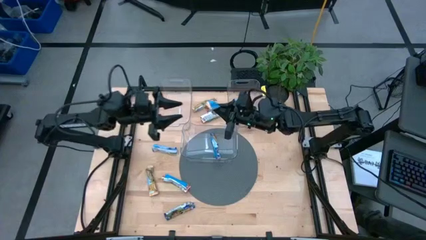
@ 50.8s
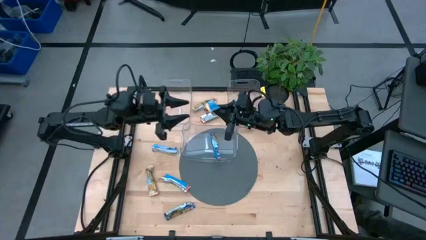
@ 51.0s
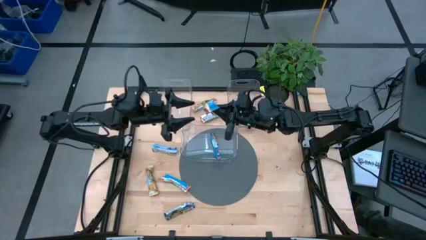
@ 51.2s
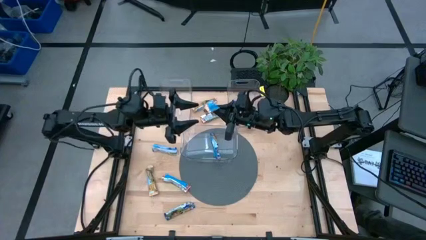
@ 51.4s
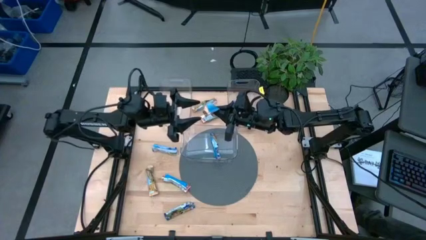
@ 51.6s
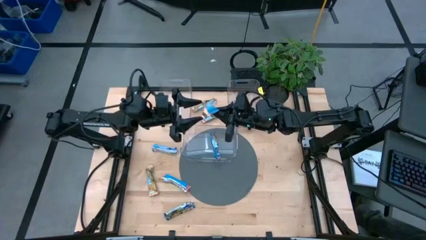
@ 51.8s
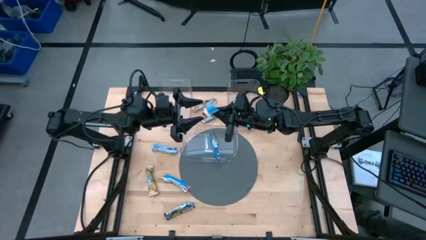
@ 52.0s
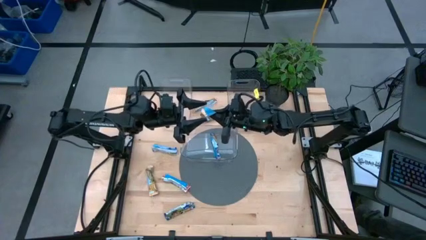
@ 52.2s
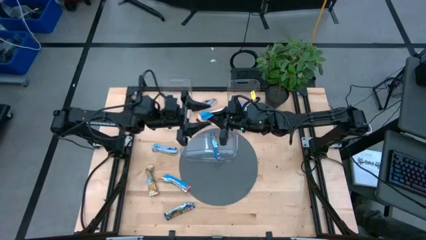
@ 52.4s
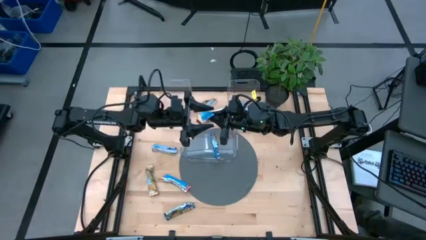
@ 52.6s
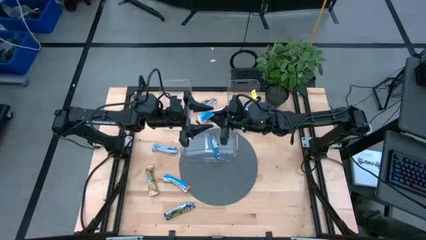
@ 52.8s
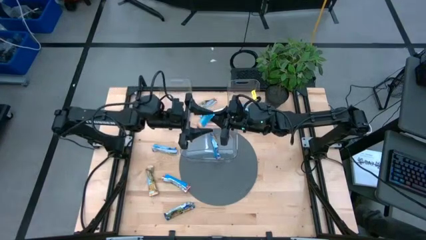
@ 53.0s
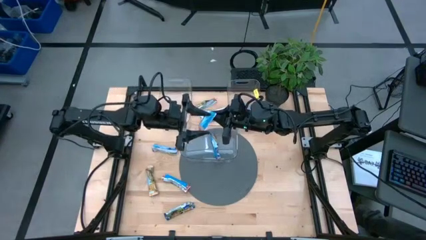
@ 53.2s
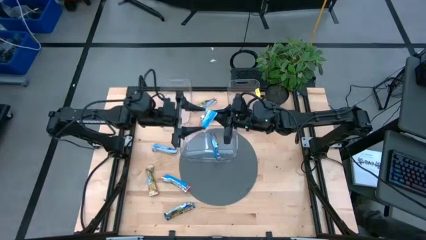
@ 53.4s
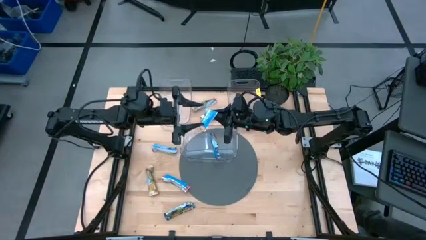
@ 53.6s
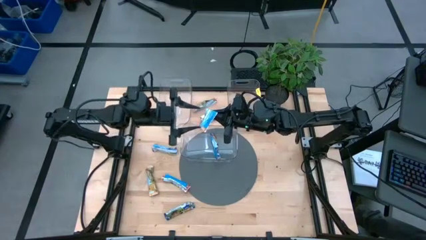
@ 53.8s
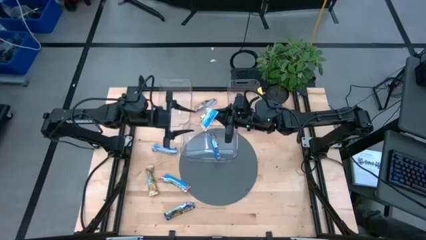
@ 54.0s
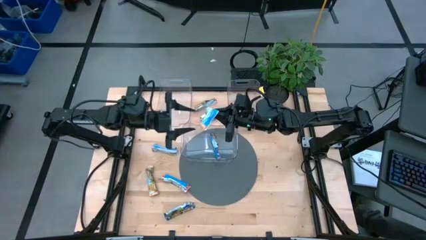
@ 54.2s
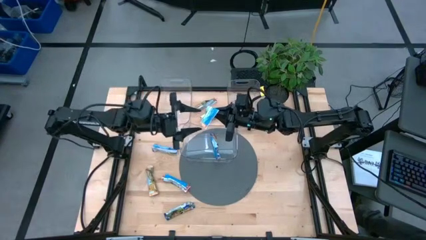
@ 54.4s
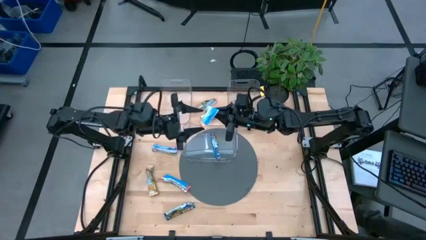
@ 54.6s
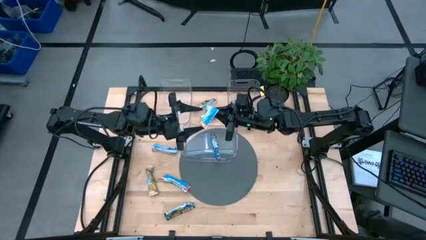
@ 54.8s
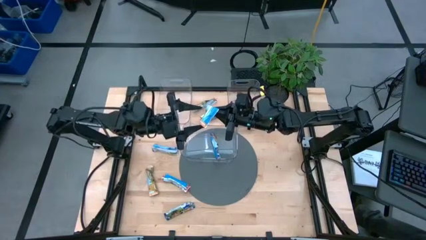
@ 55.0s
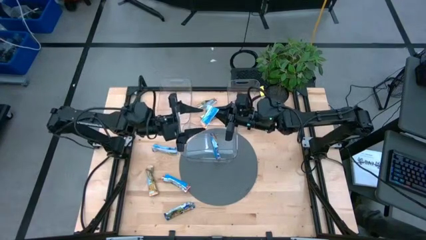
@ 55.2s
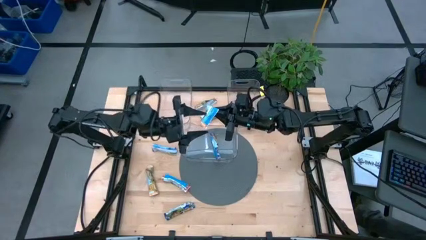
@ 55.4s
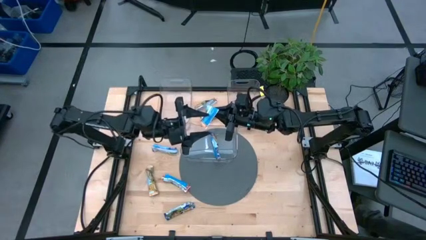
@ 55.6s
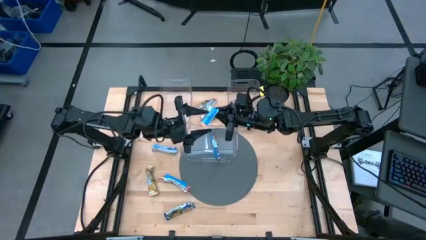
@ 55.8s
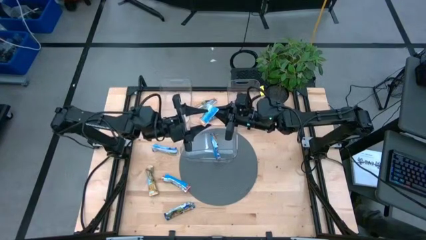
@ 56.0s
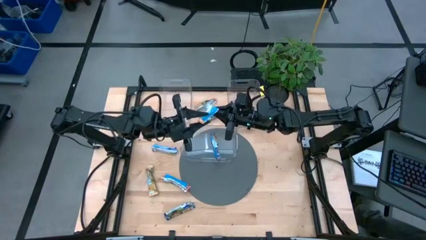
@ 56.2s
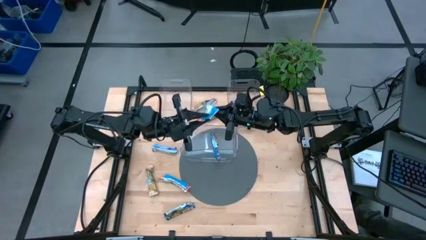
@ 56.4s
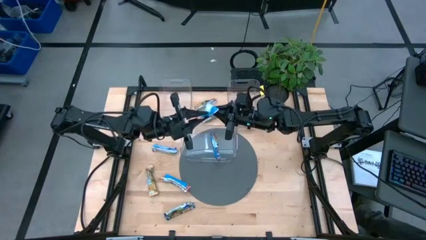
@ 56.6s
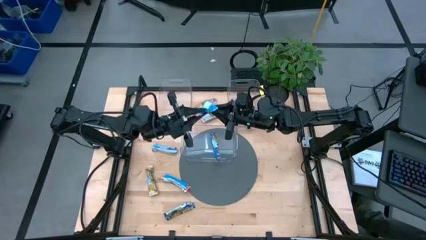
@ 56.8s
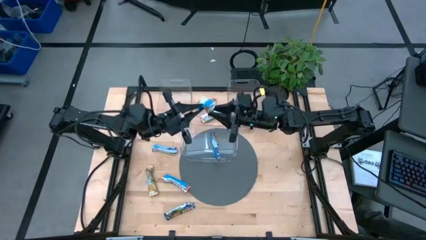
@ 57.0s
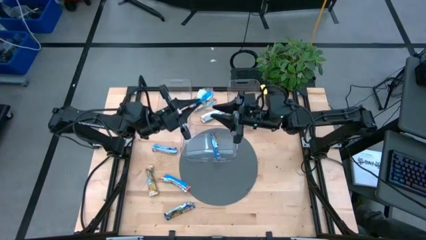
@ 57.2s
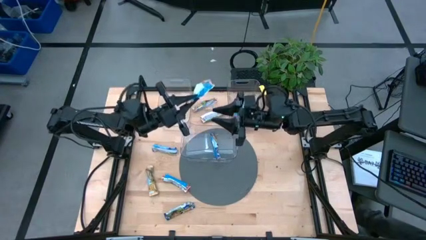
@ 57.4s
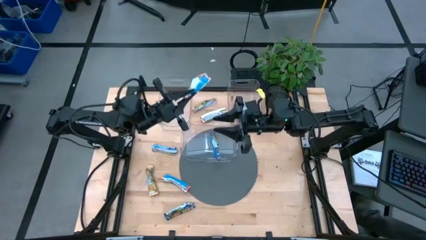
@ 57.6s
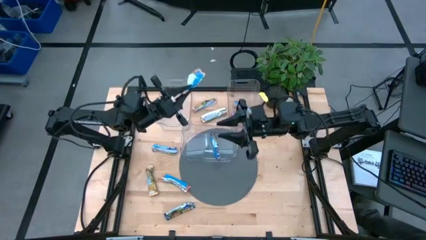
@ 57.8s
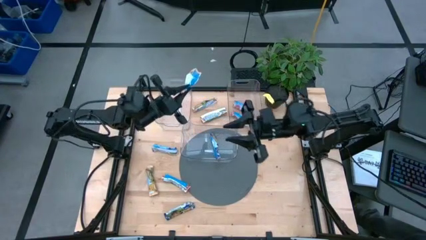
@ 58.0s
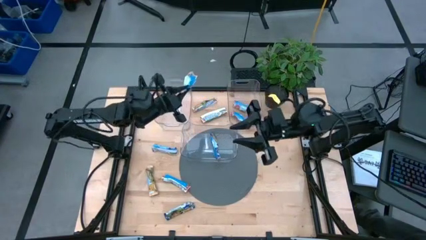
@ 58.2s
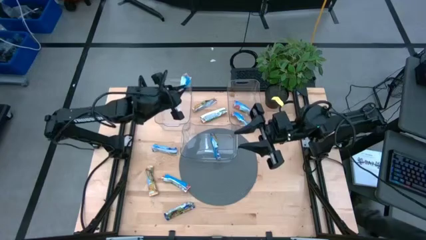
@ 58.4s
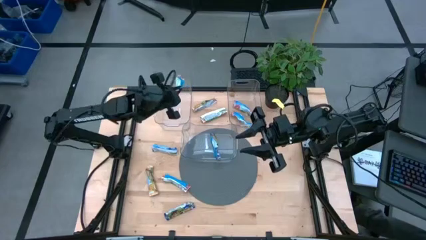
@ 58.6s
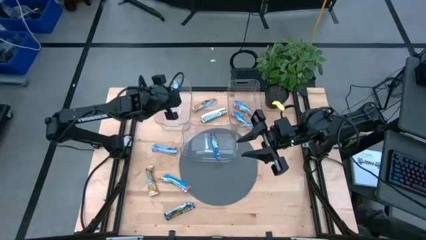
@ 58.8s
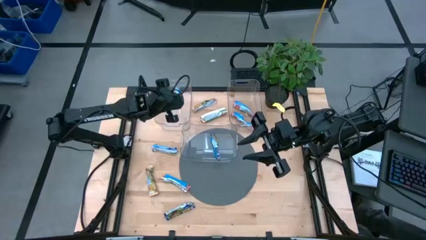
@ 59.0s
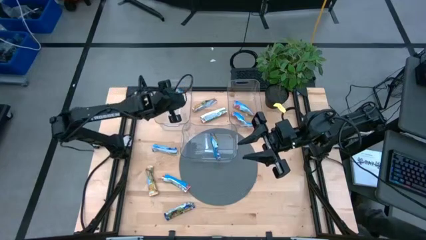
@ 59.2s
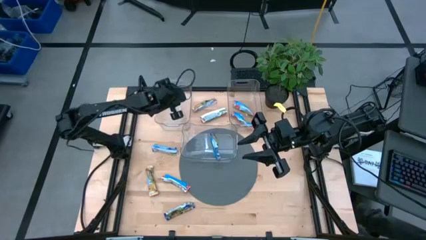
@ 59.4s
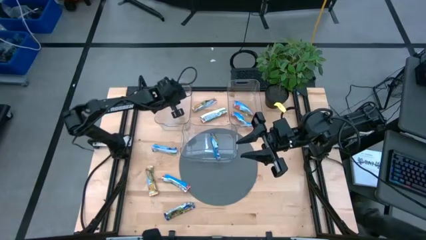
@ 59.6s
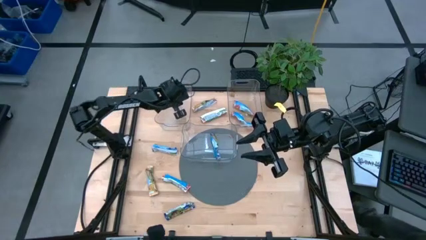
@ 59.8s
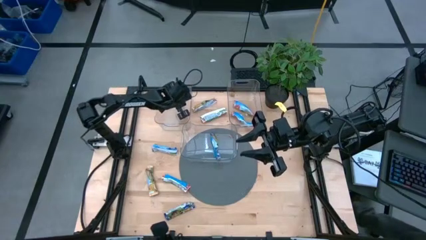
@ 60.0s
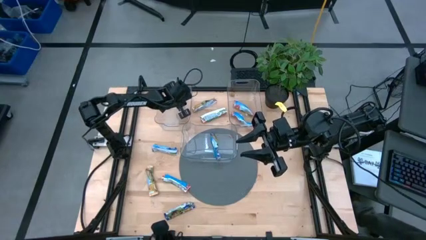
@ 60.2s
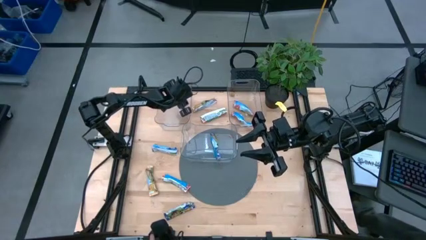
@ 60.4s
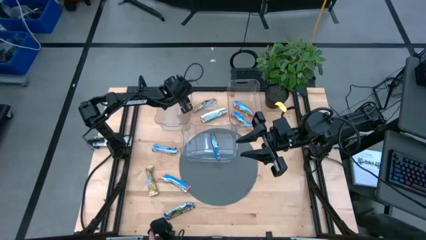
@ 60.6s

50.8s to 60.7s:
Task: Pick and place Granola Bars by type
Put the yellow granola bar into the top left transparent bin

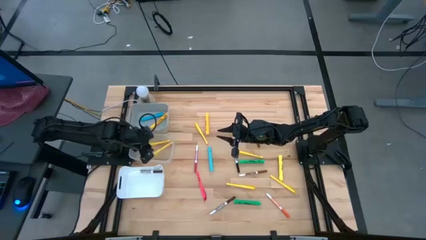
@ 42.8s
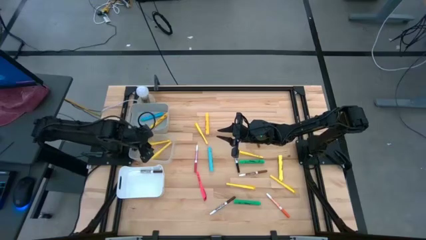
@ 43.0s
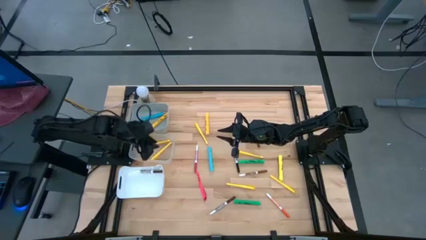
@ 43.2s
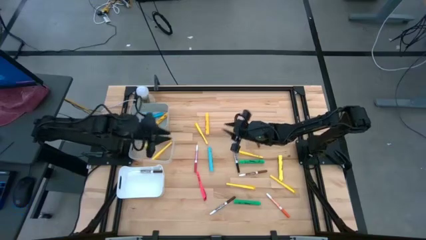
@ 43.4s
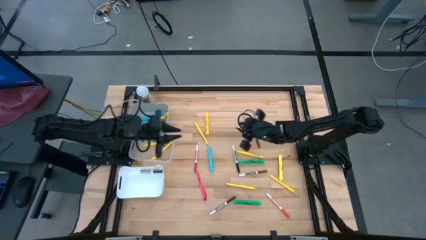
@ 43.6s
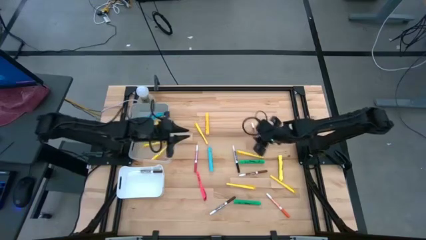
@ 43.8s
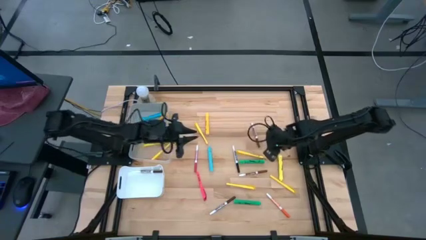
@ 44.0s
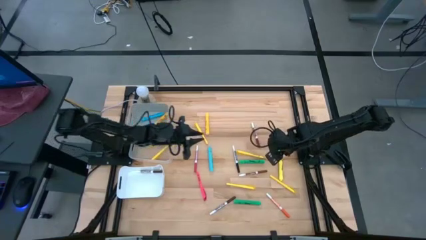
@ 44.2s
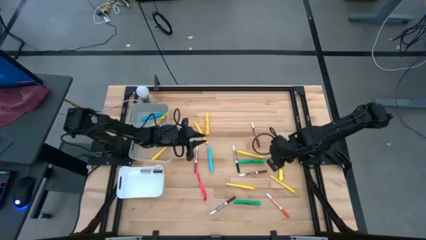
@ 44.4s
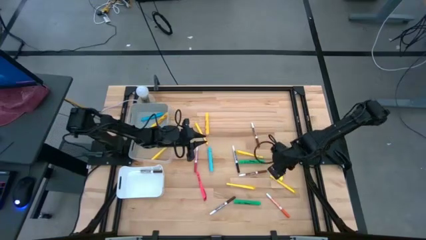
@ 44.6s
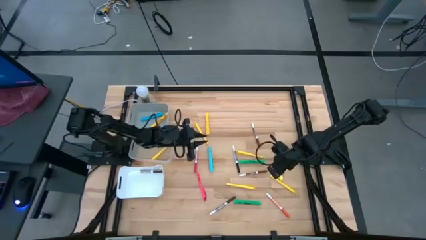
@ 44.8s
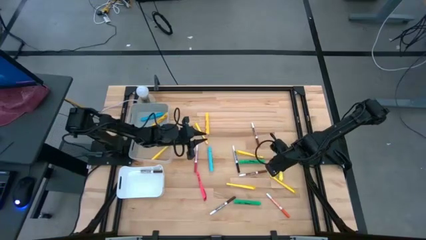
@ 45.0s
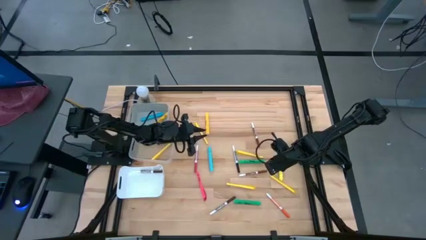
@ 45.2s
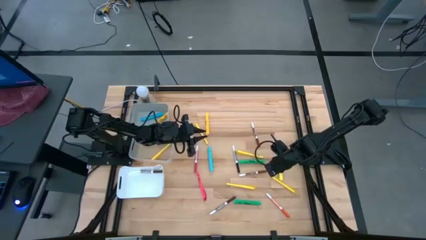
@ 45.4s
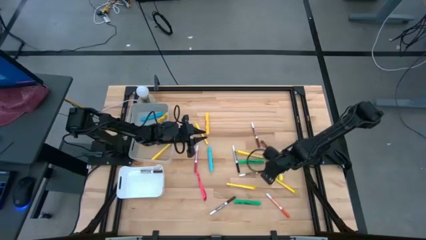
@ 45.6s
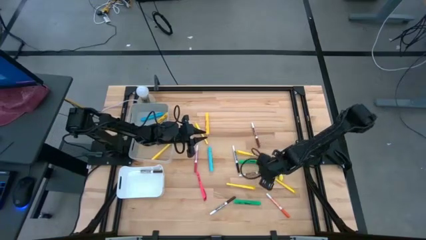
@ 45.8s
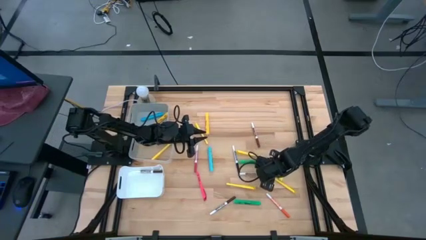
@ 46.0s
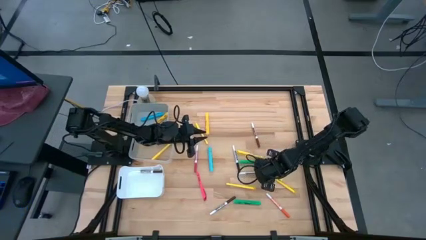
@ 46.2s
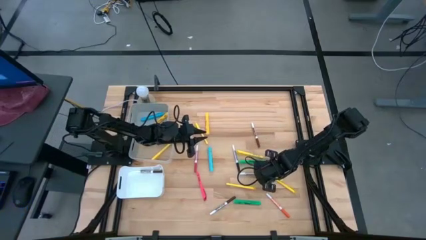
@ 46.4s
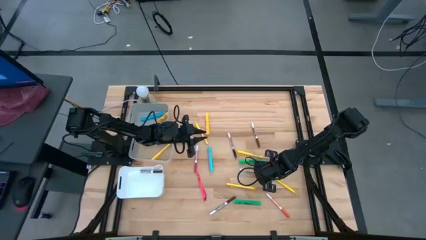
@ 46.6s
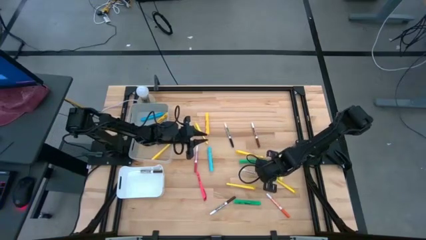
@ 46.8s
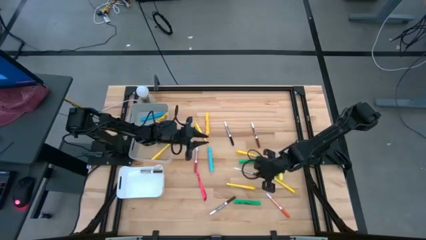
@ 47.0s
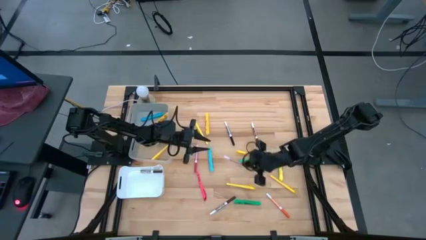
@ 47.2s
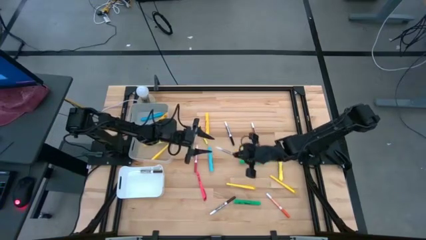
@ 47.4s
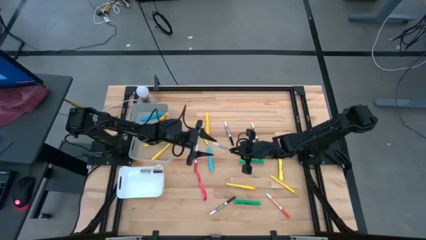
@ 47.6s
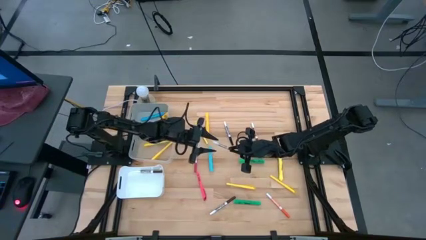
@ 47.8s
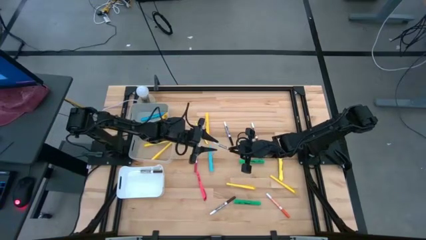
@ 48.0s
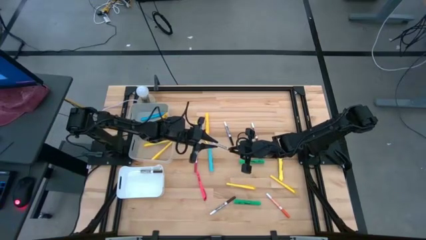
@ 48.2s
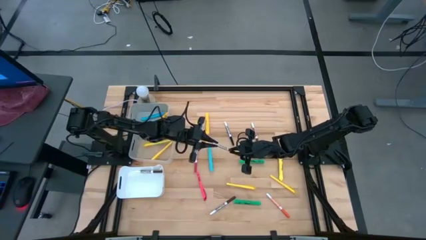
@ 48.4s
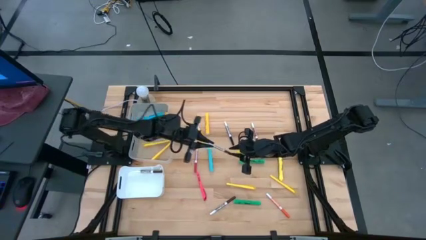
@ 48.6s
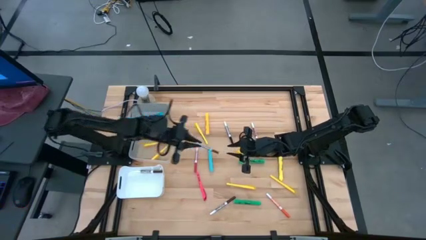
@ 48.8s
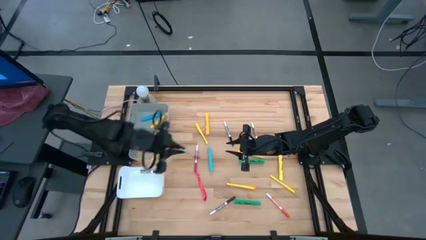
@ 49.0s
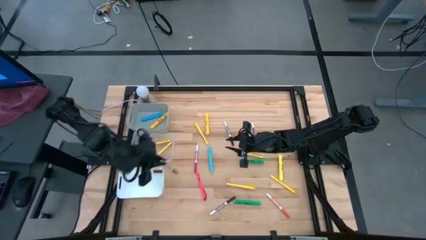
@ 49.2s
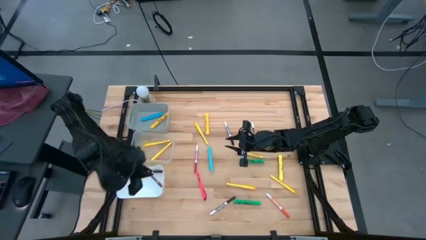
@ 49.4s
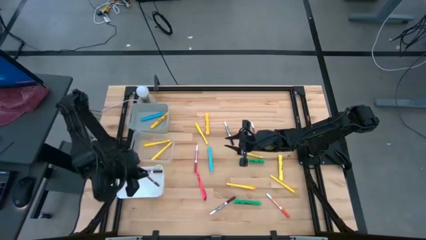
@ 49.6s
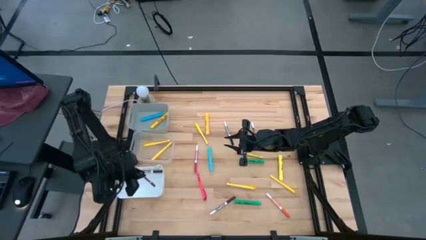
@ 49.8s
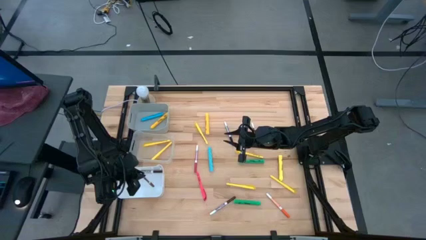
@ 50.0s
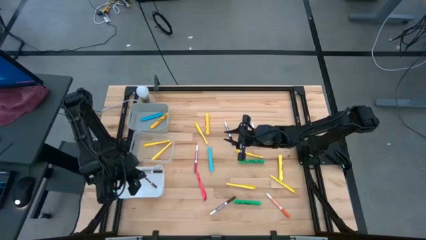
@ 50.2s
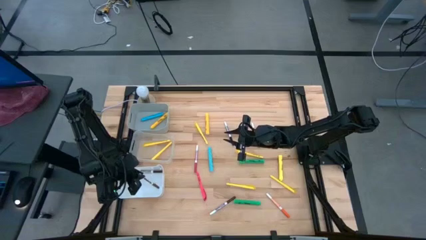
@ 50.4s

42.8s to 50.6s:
Task: Pick & Place Markers
Put the brown marker into the white bin
